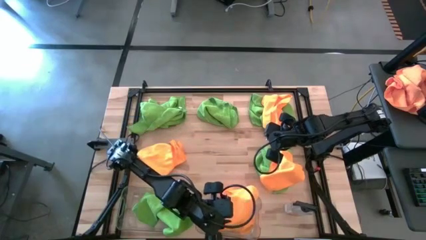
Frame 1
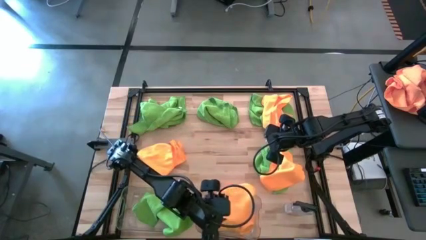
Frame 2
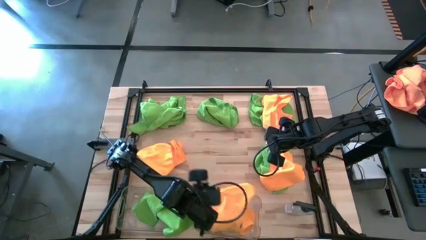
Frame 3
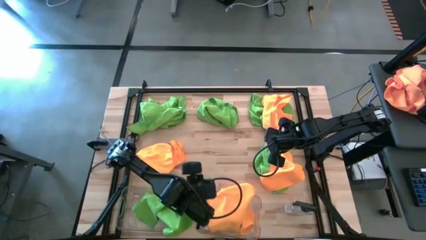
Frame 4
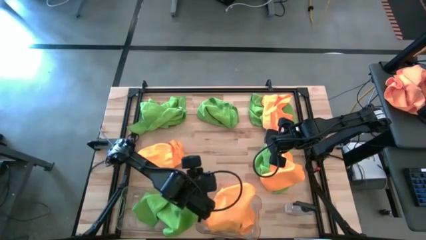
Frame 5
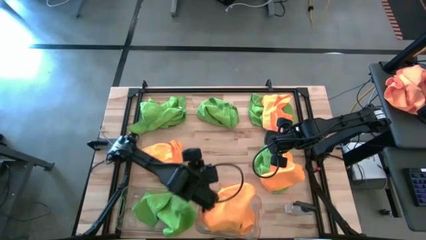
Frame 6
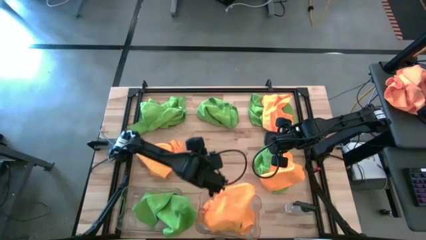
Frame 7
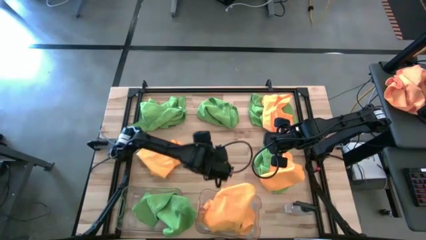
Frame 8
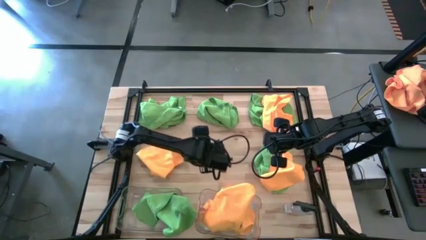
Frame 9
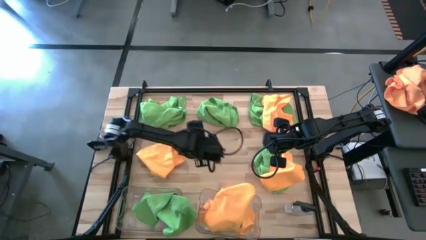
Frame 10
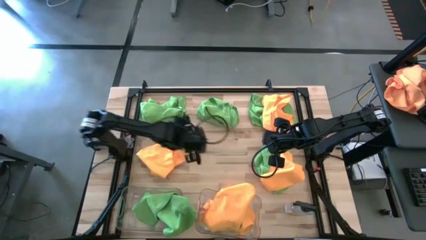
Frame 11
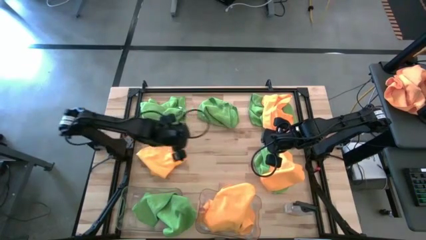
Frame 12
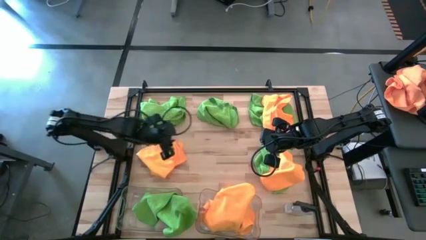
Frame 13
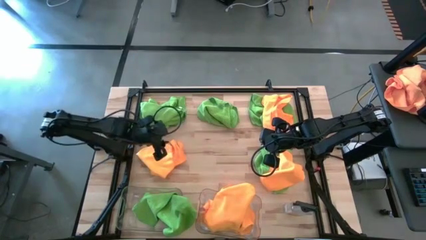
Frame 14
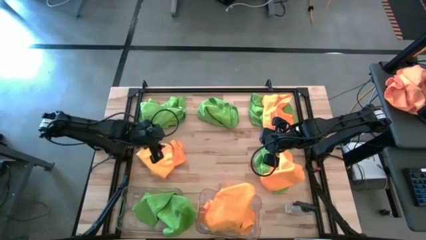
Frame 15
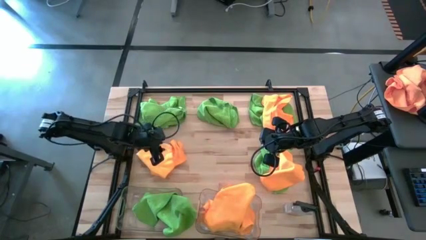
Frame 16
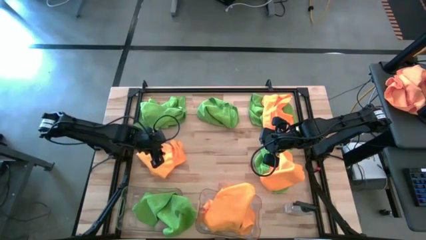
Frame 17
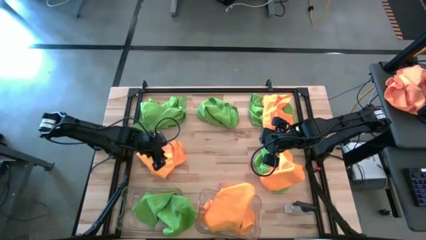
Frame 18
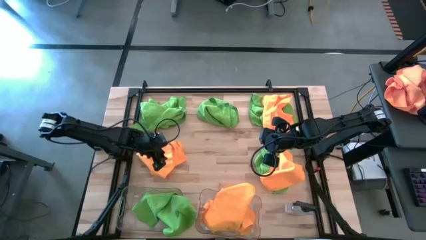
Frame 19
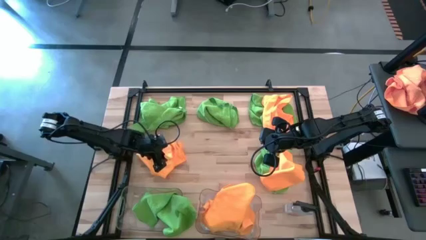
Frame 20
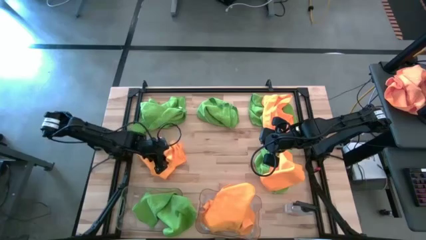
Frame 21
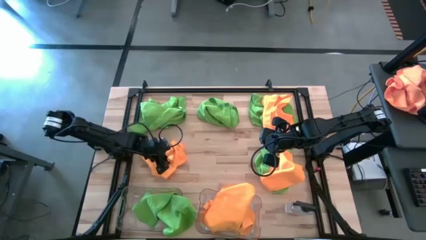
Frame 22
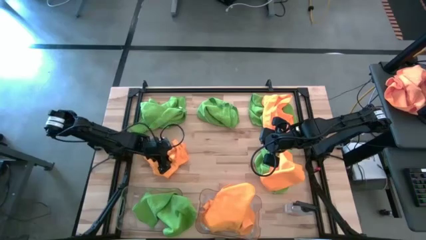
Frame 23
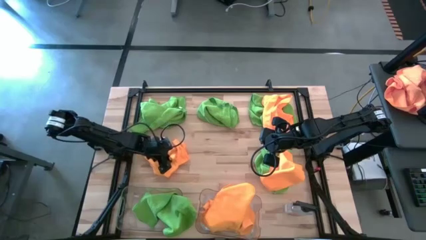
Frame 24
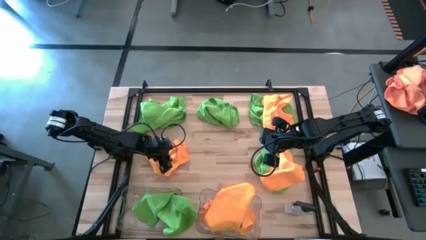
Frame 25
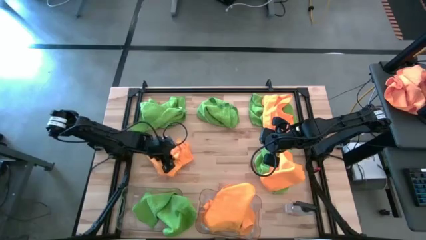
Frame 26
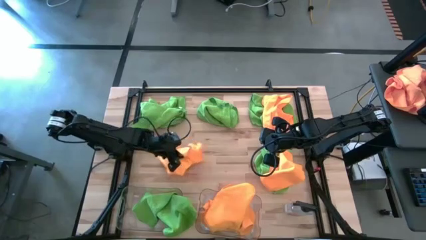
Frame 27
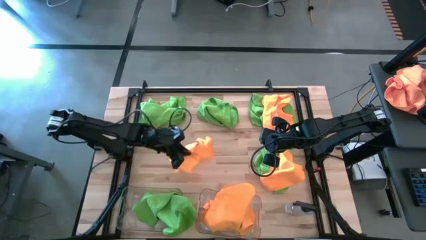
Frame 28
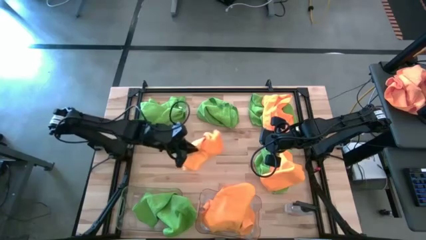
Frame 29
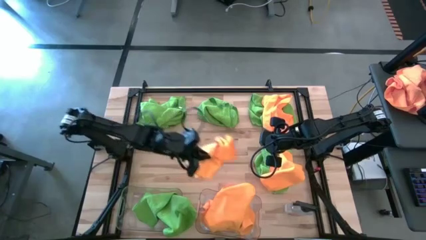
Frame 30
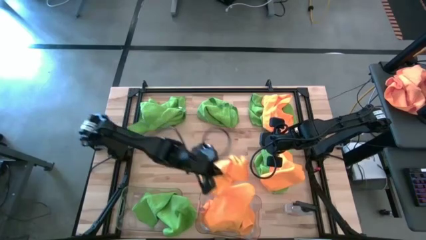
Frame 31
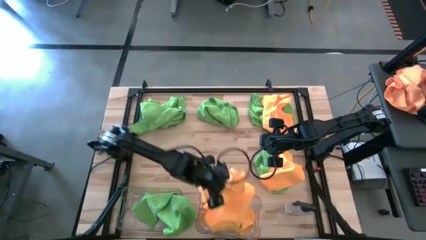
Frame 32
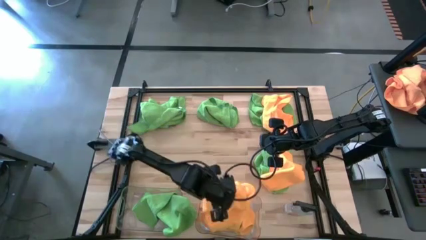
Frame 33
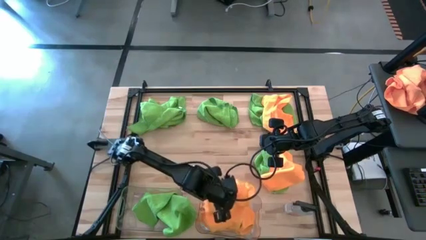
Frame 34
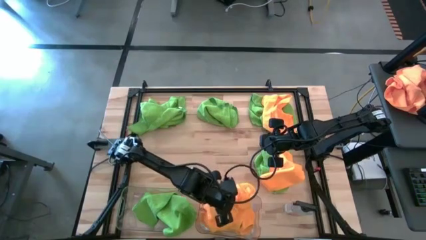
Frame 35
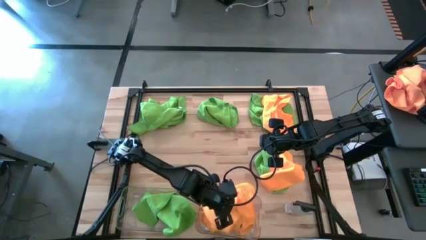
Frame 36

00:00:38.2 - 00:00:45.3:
Task: Sort microfiber towel by color & place in baskets
Put the orange towel into the right transparent bin

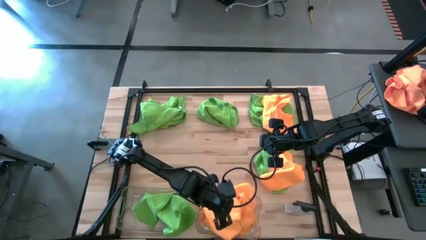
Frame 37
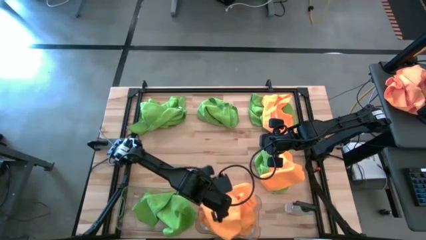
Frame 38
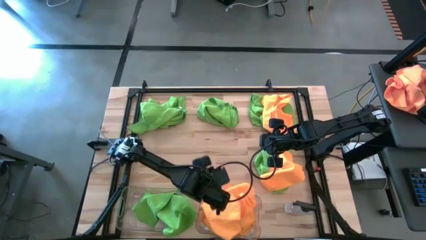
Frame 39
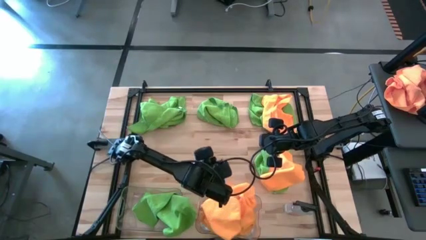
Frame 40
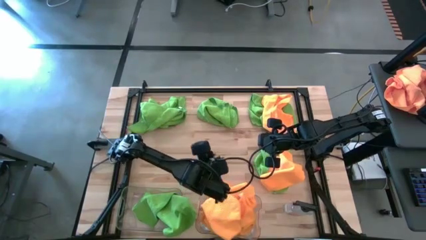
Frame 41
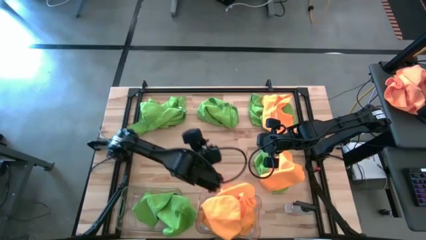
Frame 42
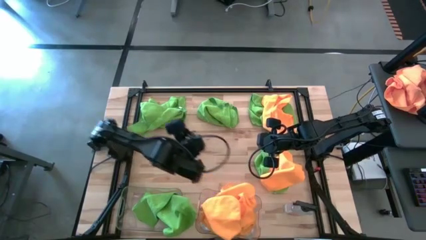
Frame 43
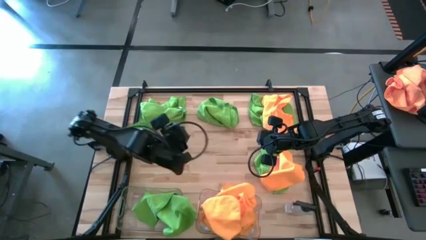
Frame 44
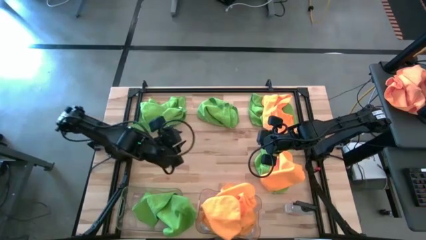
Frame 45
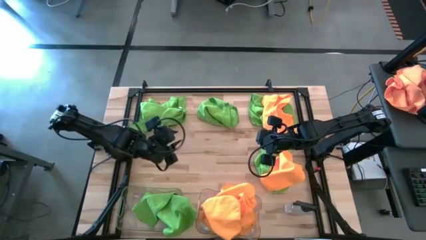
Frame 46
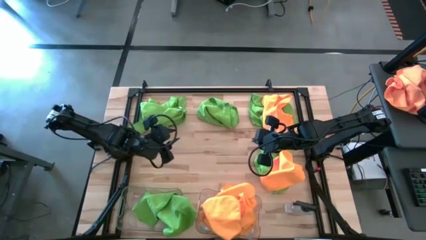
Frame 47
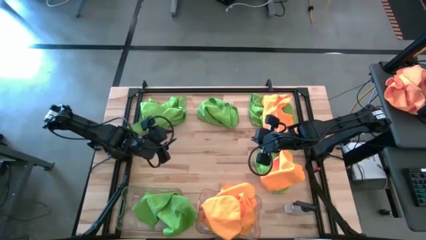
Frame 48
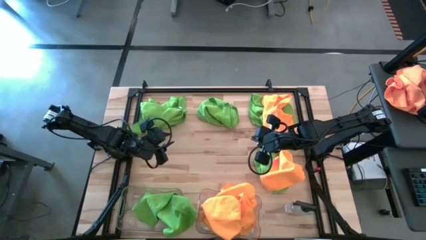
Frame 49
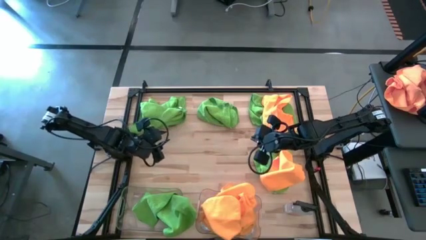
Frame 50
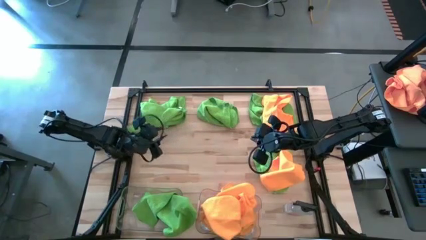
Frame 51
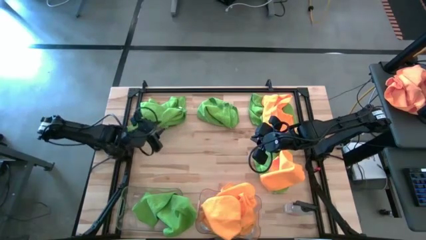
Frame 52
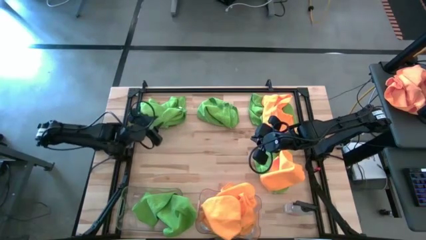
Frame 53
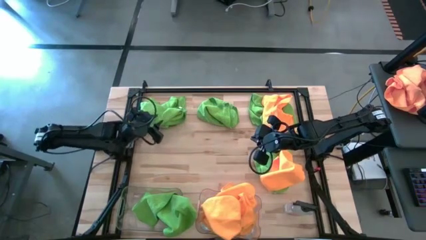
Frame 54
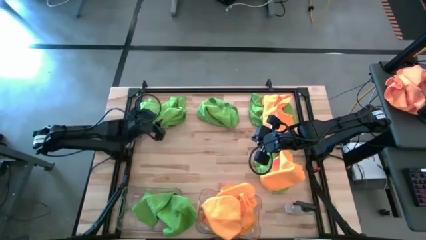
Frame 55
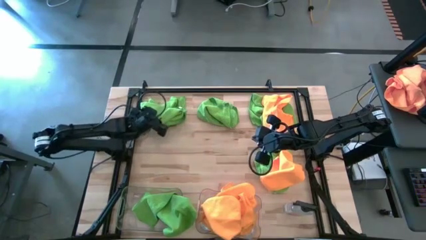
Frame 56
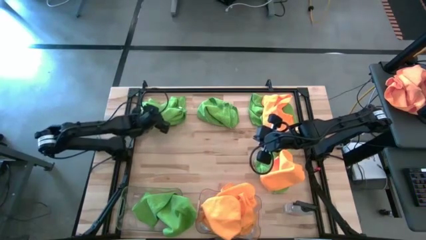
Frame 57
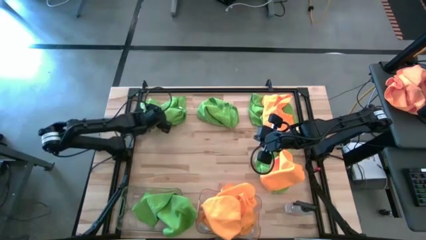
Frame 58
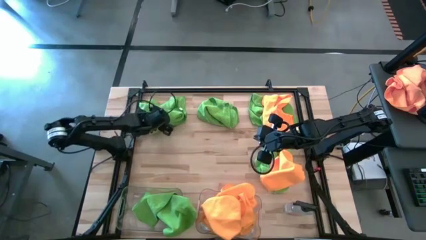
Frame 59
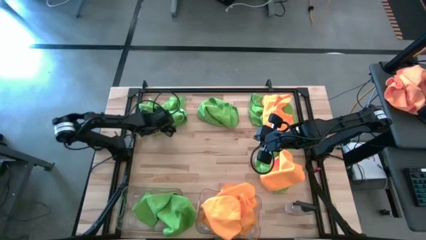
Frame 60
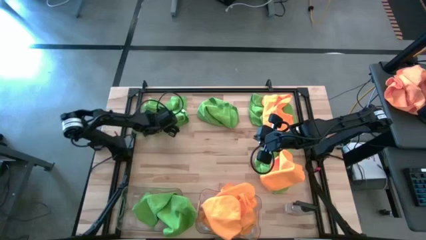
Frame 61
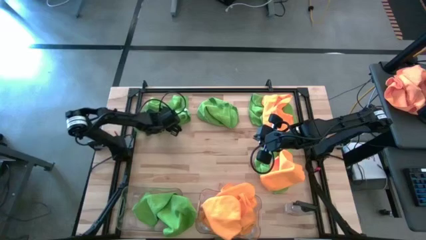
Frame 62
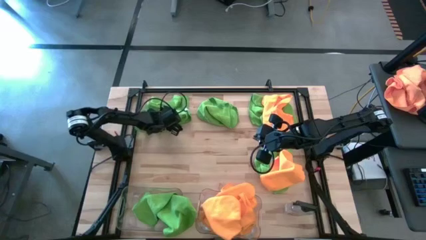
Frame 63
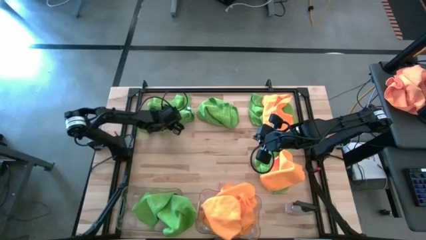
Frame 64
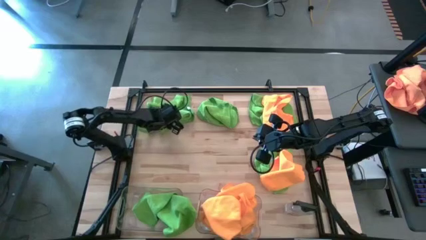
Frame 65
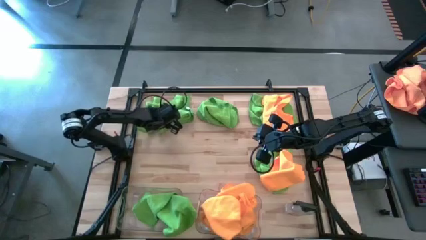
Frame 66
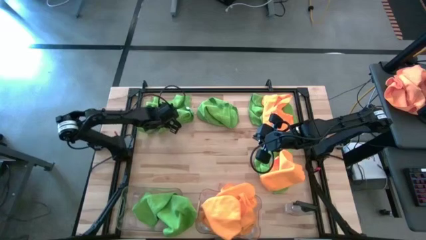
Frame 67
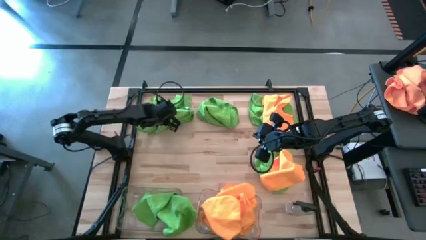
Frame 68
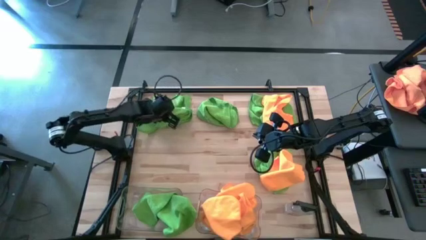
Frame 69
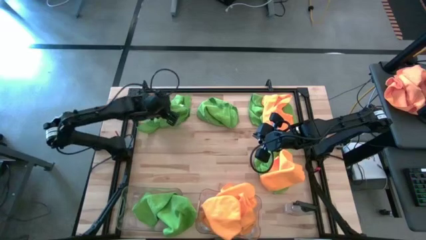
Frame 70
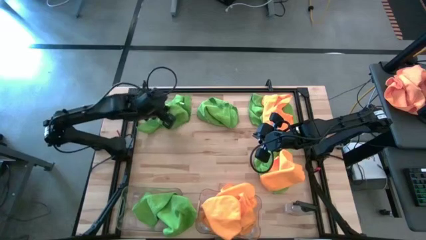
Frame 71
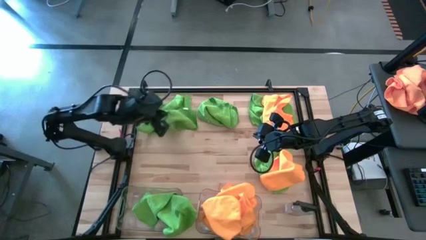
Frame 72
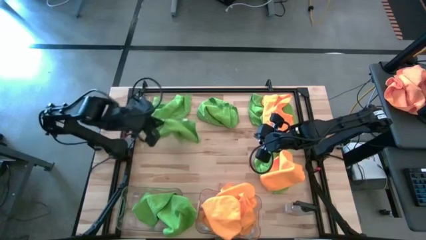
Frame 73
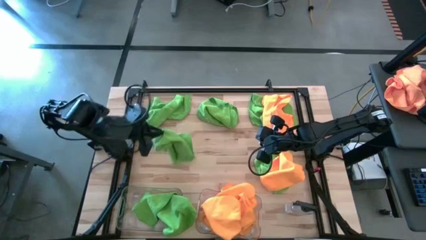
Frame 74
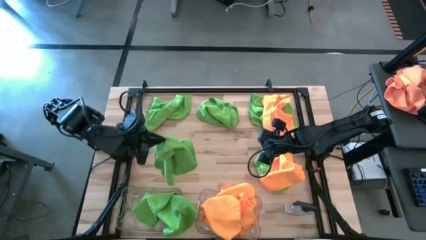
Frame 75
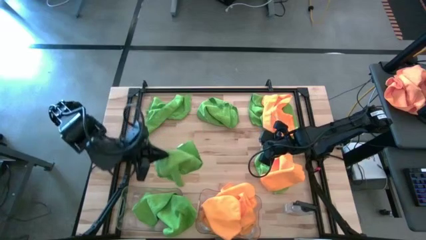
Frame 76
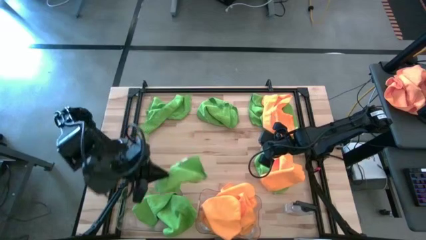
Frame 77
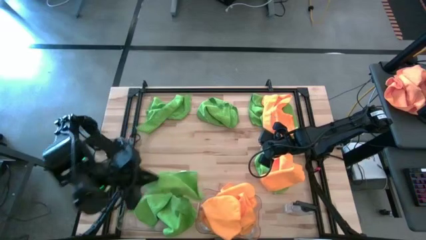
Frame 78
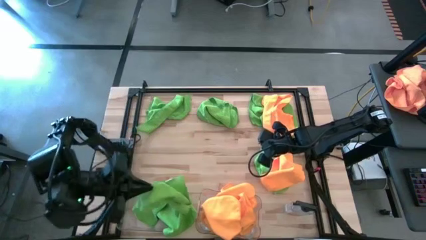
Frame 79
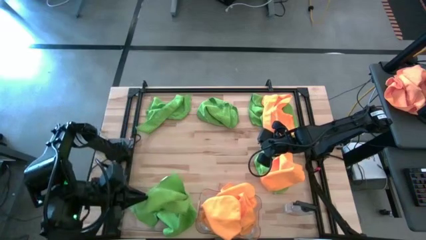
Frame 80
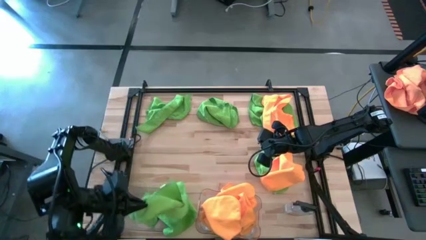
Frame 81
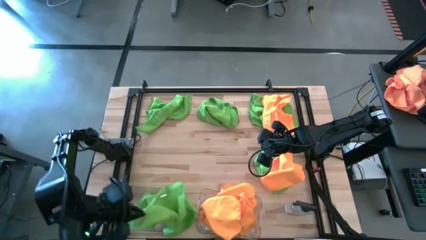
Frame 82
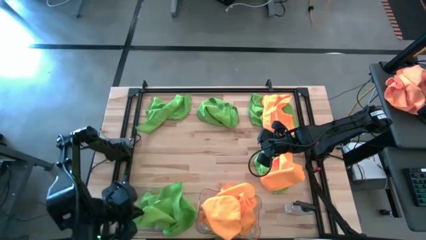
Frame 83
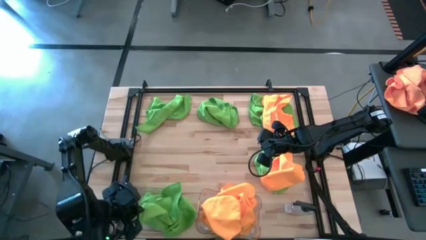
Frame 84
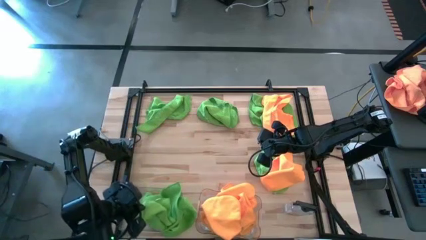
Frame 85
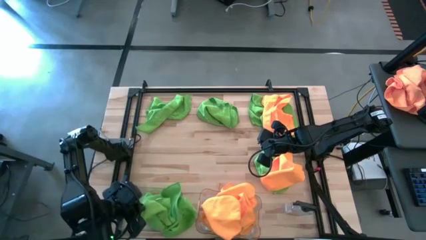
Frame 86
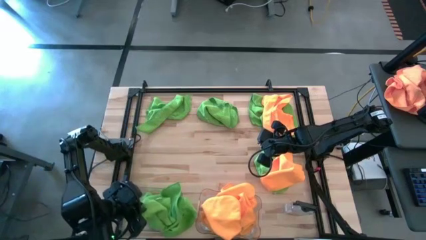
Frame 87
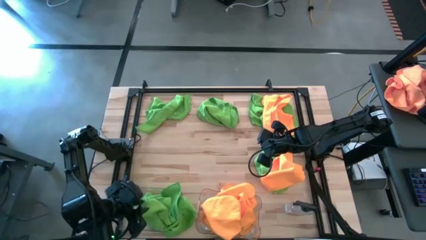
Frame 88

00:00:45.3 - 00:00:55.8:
Put the green towel into the left transparent bin
